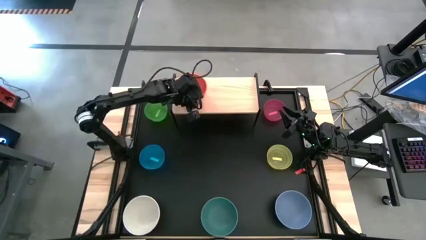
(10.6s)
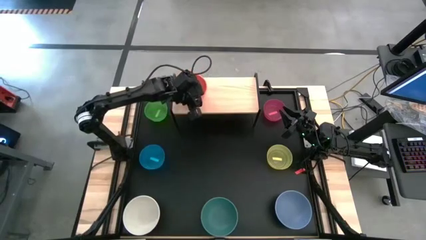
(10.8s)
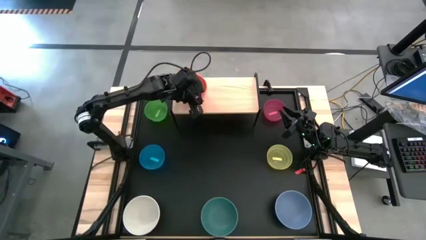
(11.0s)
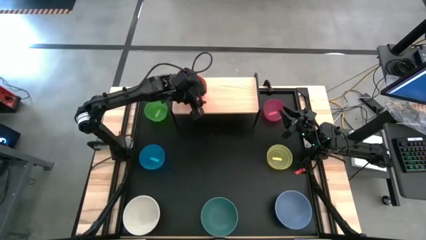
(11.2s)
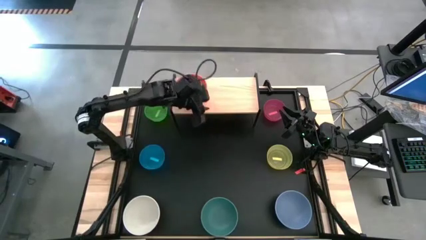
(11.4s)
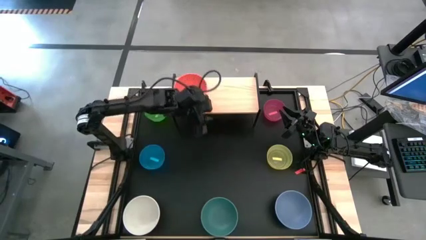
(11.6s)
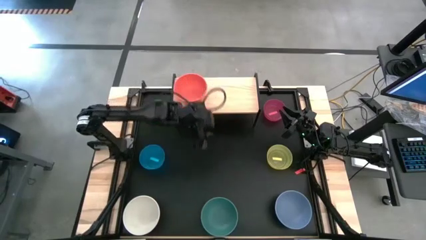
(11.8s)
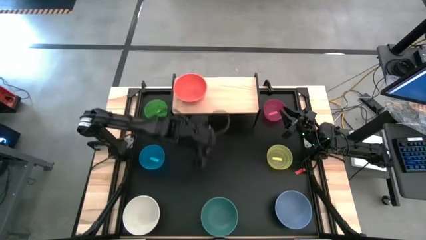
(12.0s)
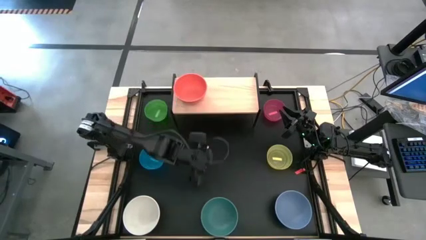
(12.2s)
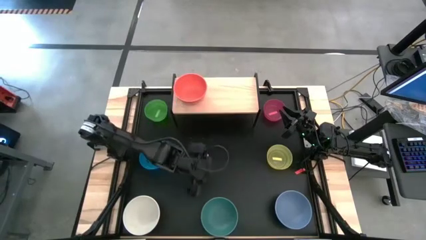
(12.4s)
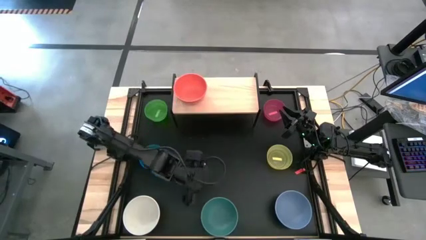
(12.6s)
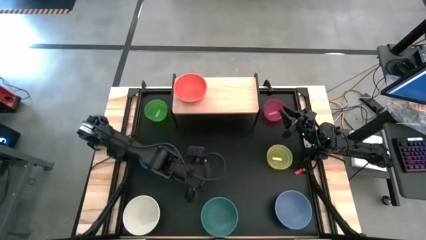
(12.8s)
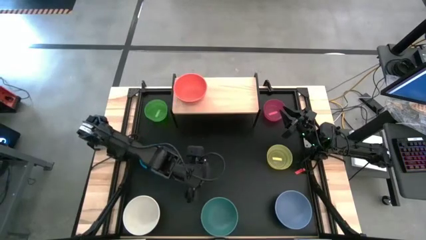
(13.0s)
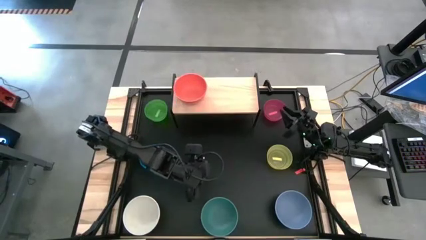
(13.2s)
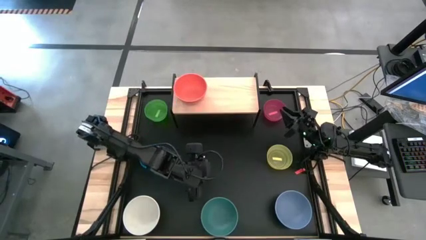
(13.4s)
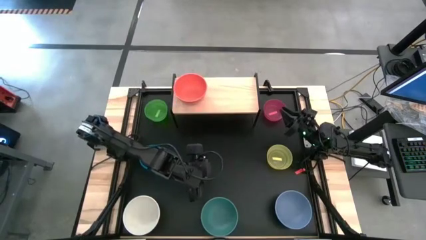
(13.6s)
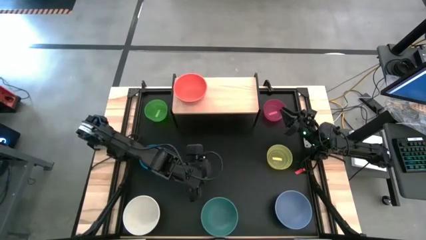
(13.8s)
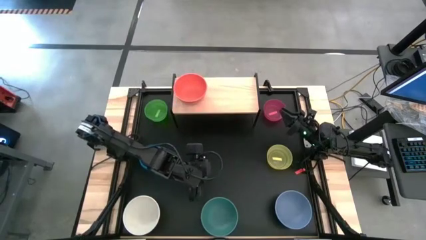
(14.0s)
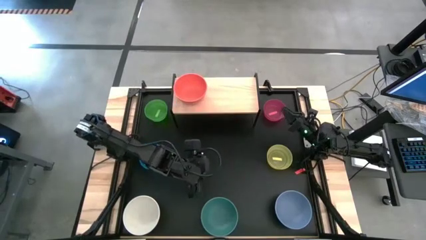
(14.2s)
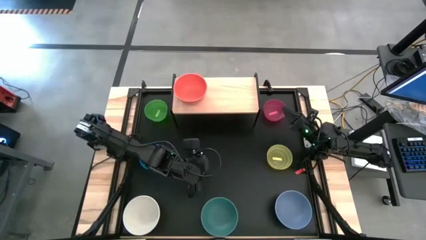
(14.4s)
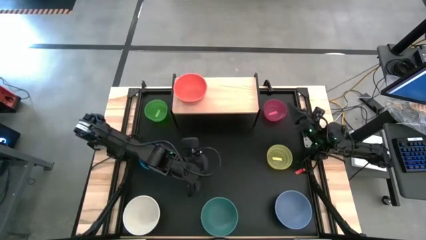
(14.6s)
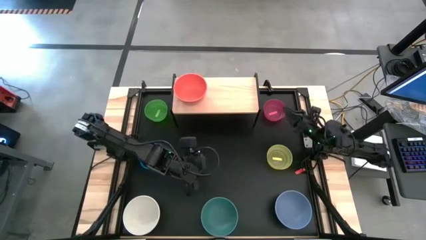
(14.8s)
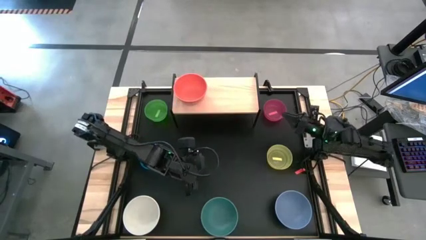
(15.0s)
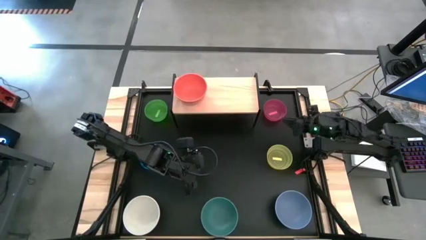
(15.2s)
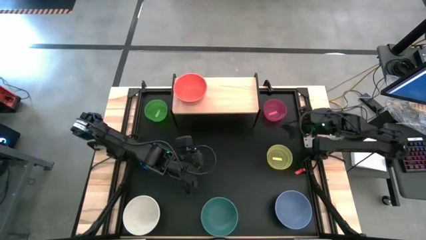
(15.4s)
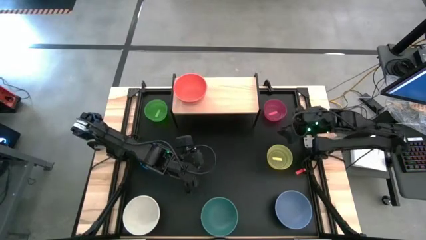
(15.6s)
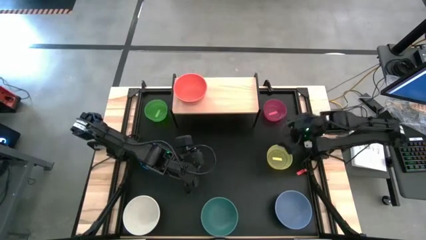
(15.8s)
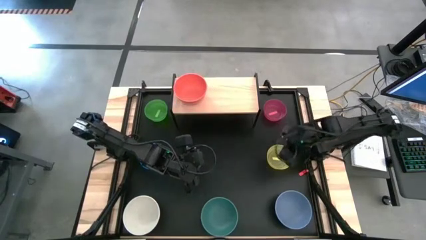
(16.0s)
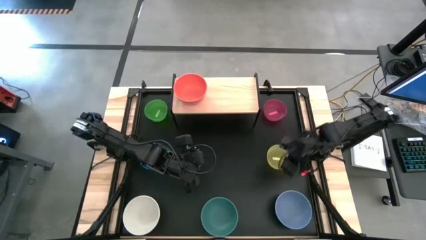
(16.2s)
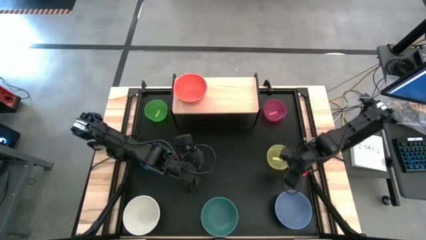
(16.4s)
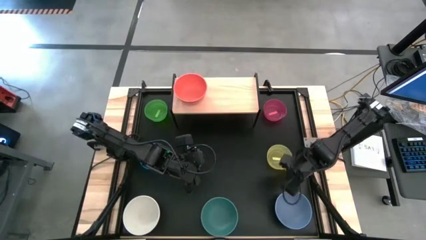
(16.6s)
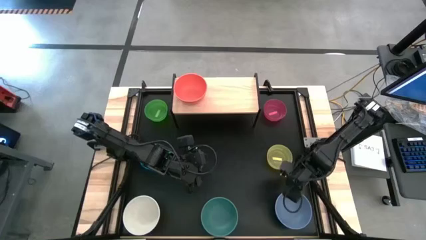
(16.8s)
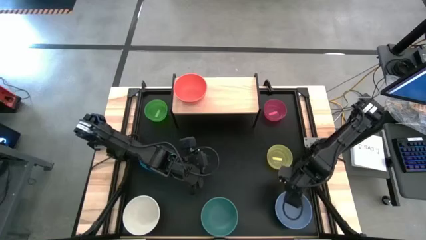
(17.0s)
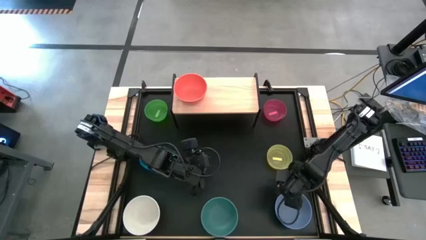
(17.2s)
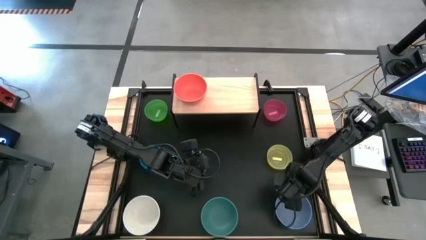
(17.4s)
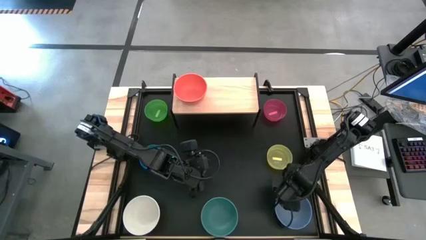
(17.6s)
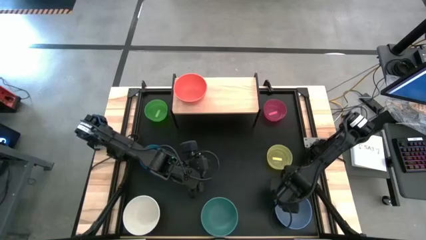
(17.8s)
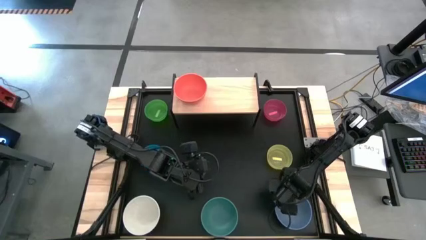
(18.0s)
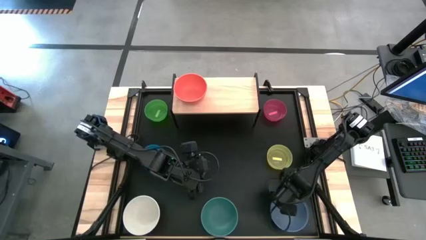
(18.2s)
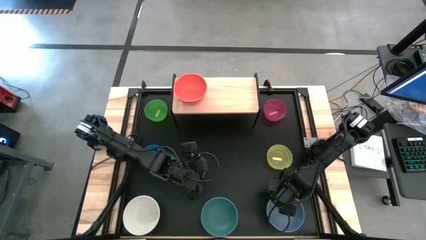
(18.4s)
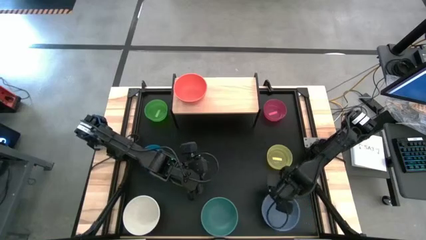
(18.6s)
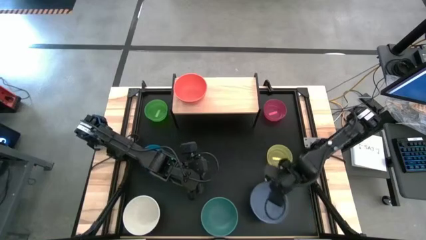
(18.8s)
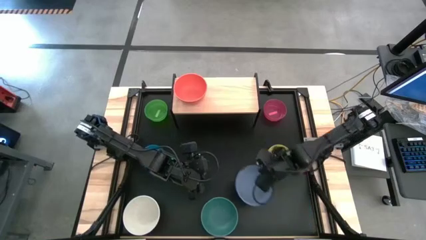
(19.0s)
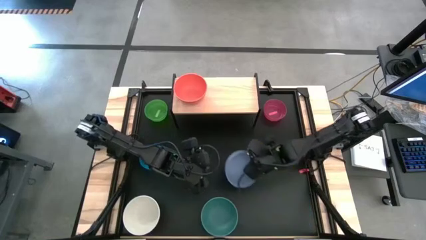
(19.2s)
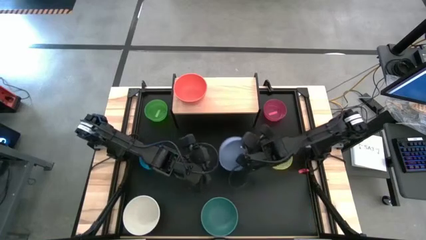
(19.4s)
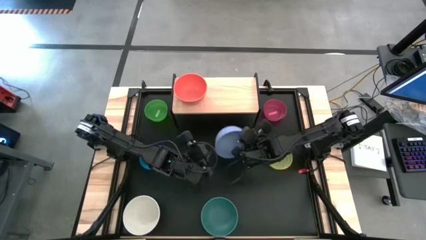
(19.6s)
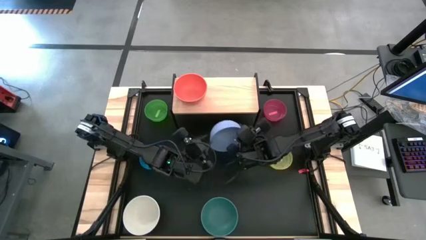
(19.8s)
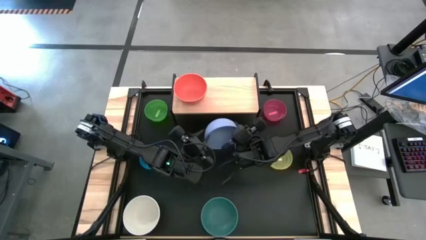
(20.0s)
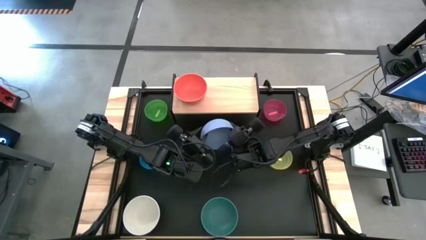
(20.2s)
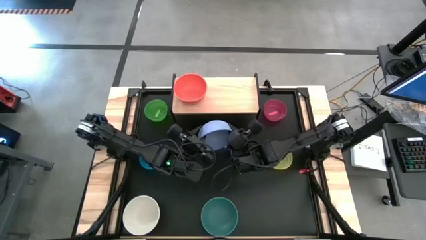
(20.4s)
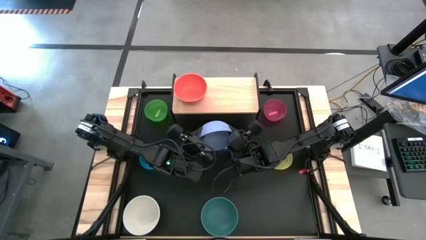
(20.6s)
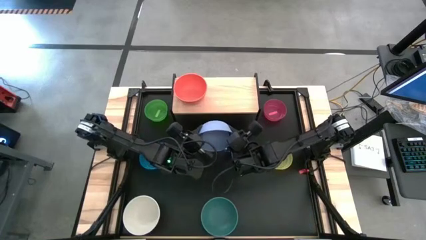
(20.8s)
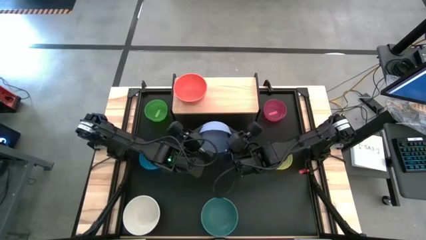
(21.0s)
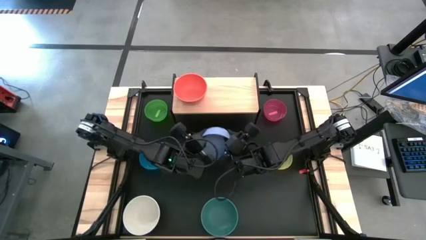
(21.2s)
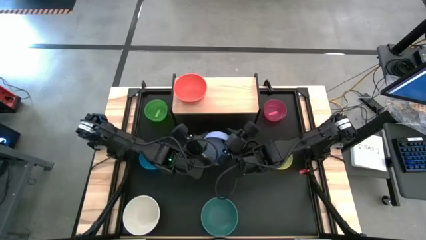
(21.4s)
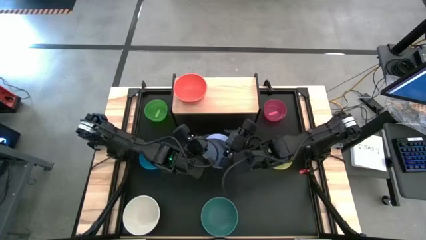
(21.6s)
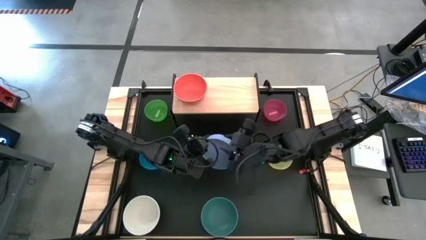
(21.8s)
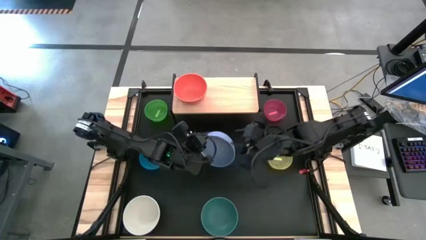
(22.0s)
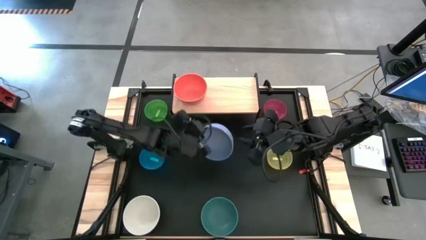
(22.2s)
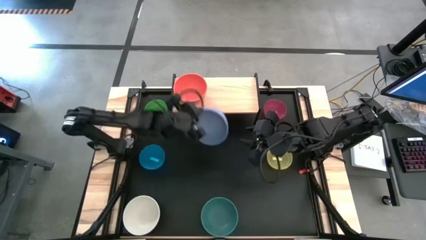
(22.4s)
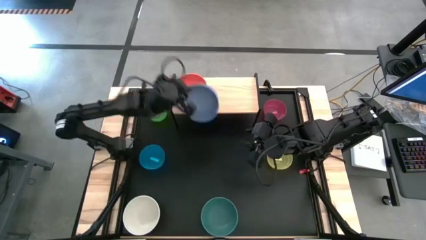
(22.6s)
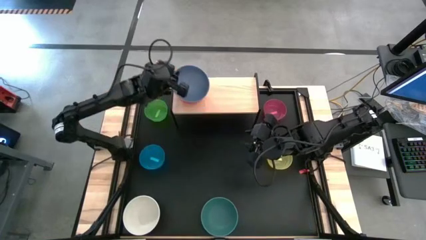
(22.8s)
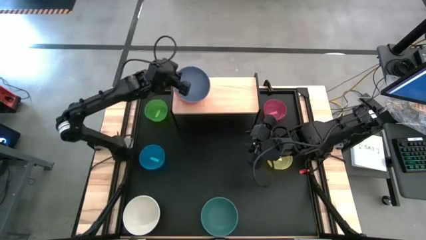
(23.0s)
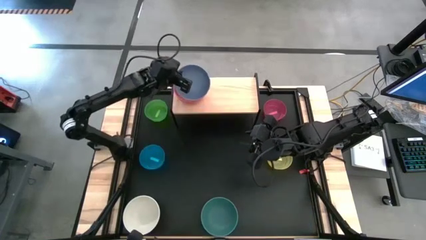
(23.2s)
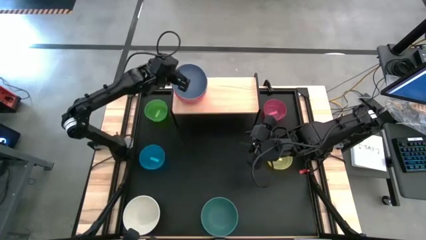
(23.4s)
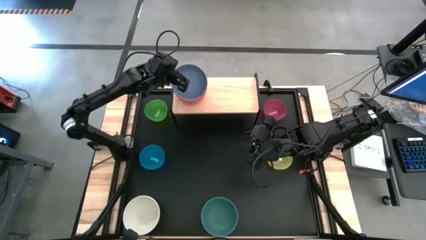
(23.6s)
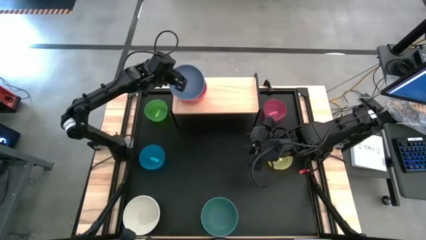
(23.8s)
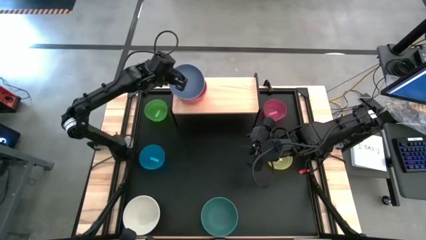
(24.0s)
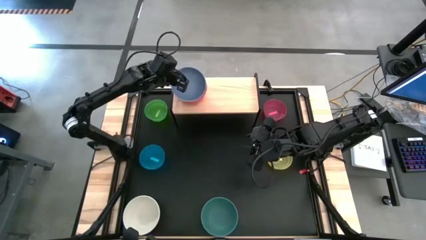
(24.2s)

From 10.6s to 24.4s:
Task: Place and stack bowls onto a shelf
Stack the large blue bowl on top of the orange bowl on the shelf

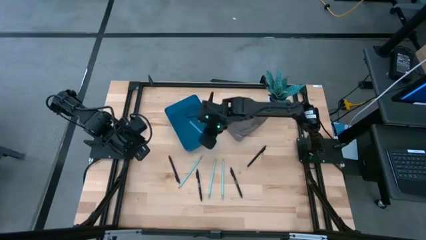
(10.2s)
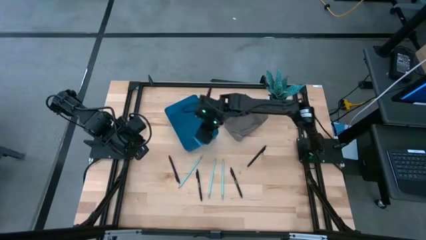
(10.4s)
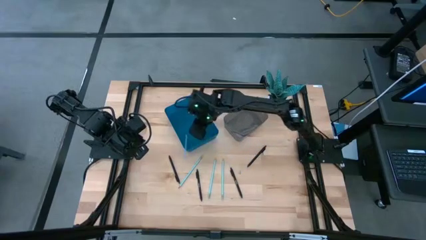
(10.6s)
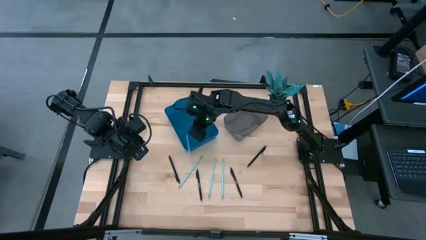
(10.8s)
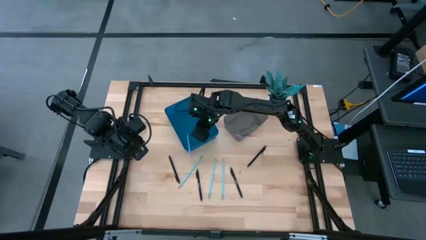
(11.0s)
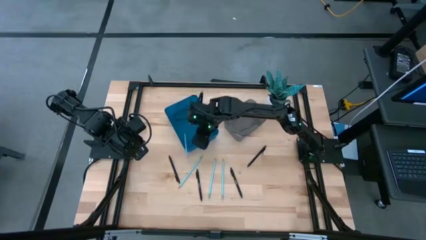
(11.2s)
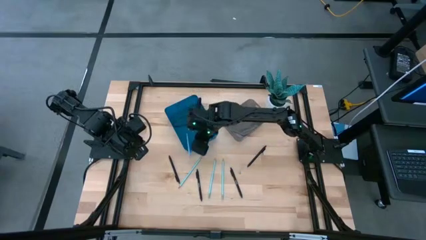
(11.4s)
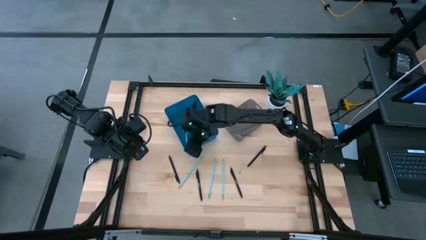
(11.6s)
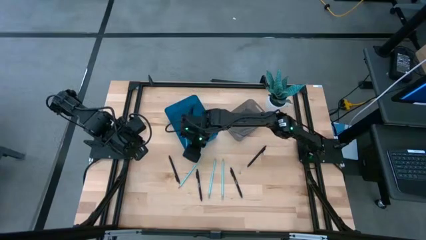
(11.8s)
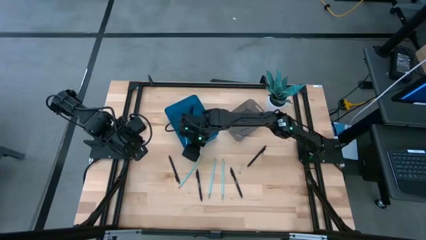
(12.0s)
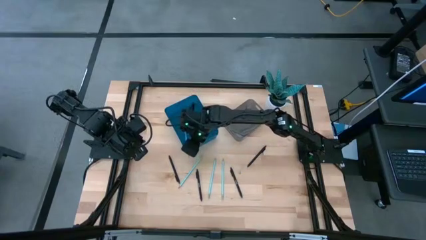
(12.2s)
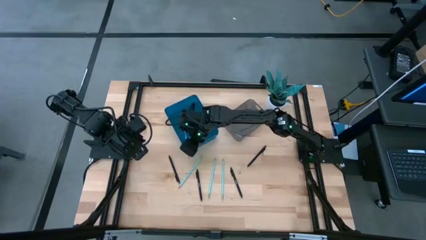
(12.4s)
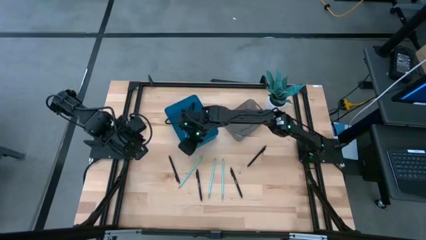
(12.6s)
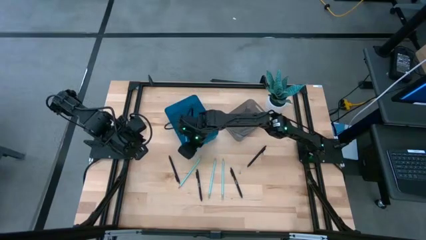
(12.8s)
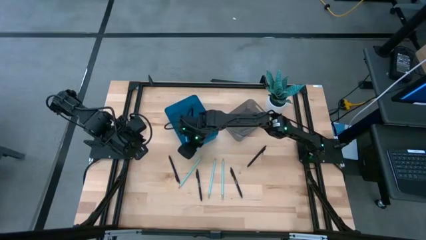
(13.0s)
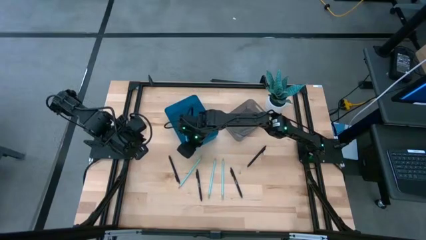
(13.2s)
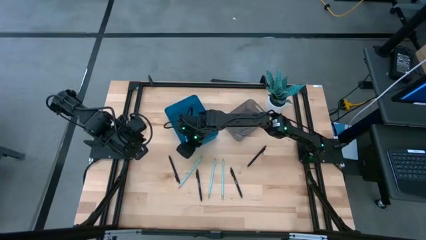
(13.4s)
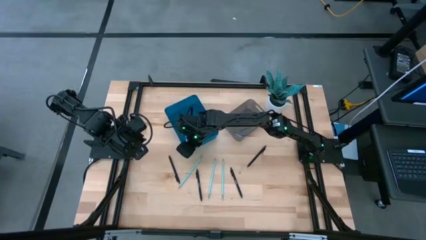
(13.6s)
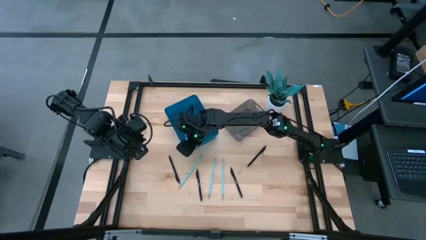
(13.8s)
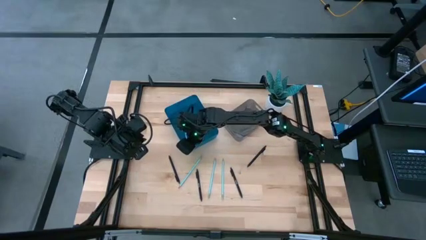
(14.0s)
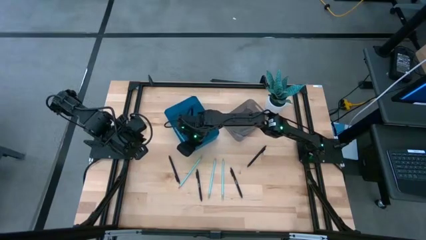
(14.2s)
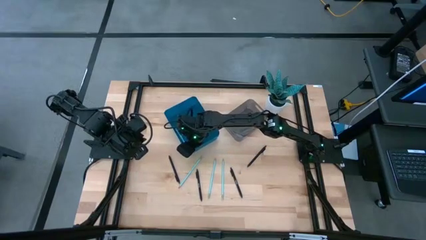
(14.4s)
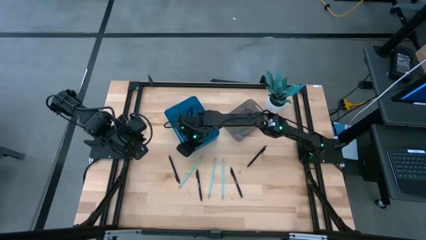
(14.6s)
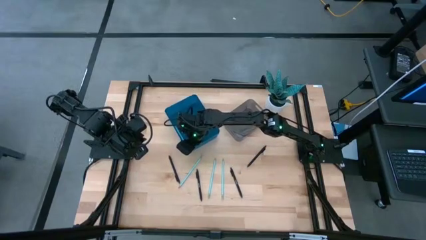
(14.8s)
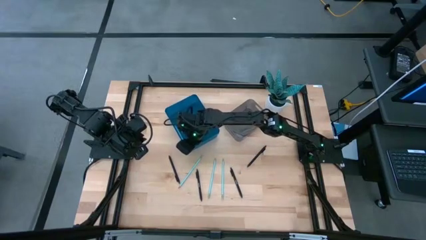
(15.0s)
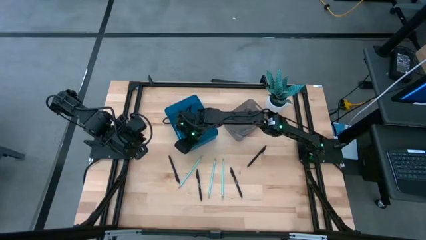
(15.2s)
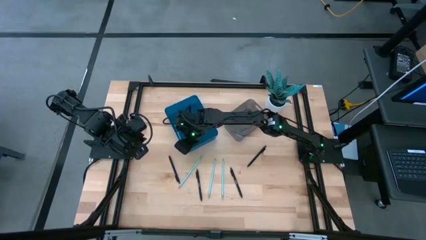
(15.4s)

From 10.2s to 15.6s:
Task: Sort pens & pencils
Put the blue pencil into the blue bin
